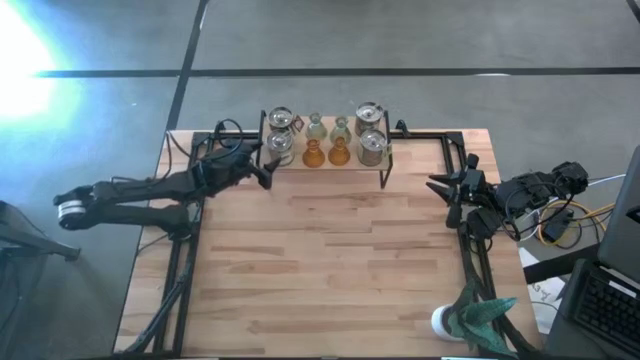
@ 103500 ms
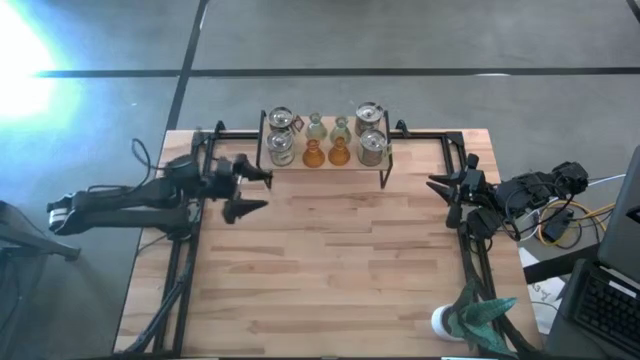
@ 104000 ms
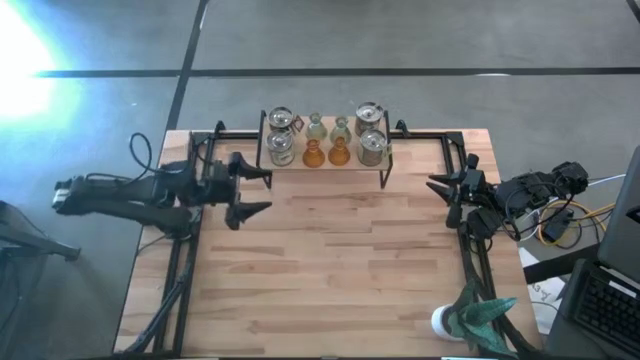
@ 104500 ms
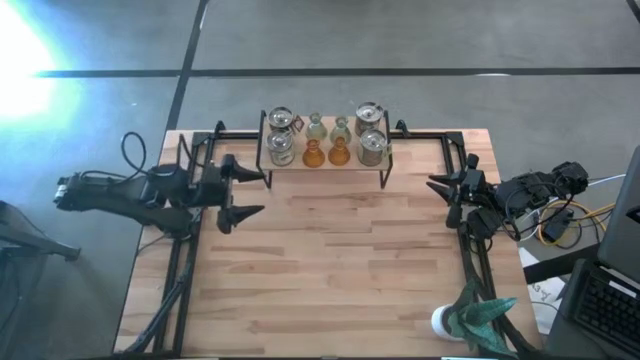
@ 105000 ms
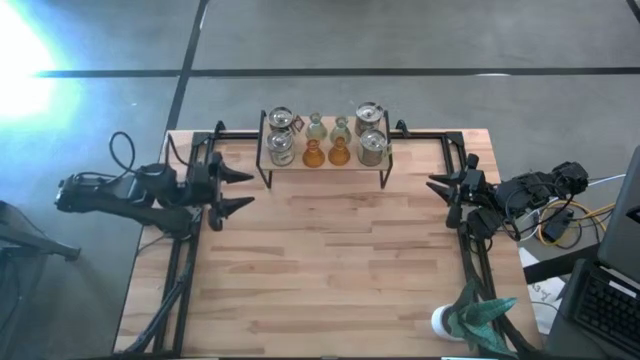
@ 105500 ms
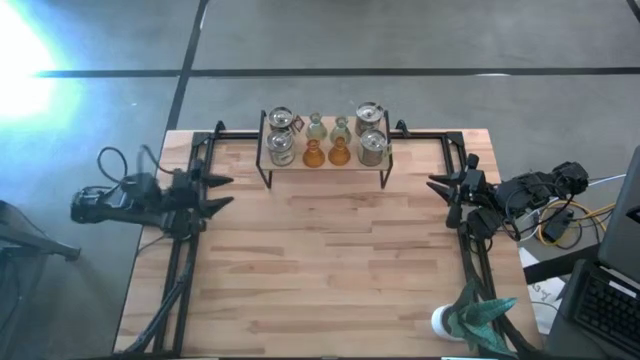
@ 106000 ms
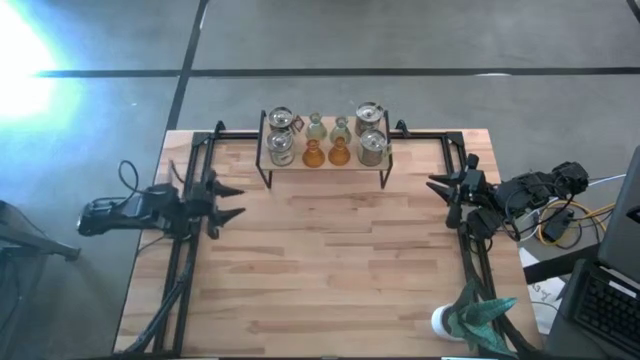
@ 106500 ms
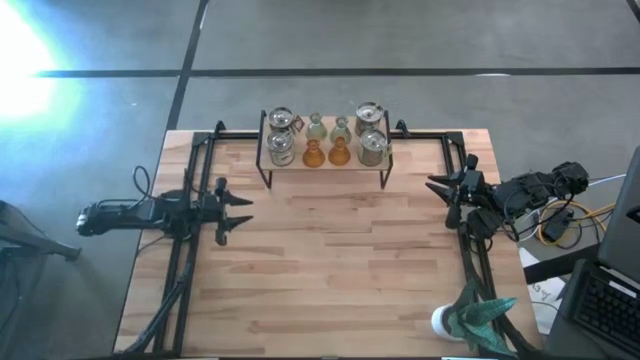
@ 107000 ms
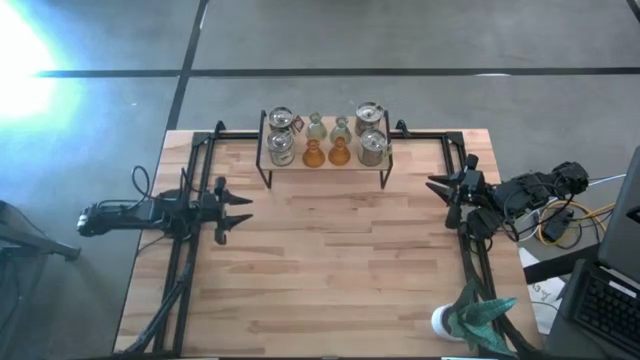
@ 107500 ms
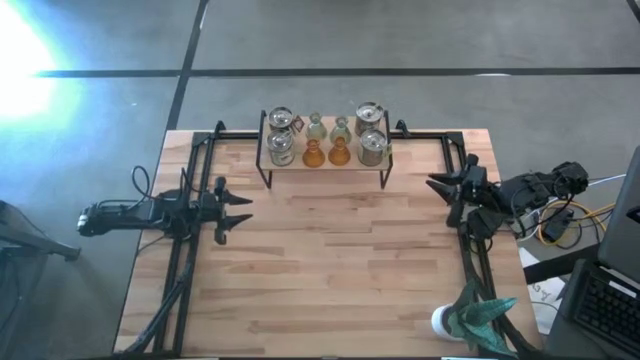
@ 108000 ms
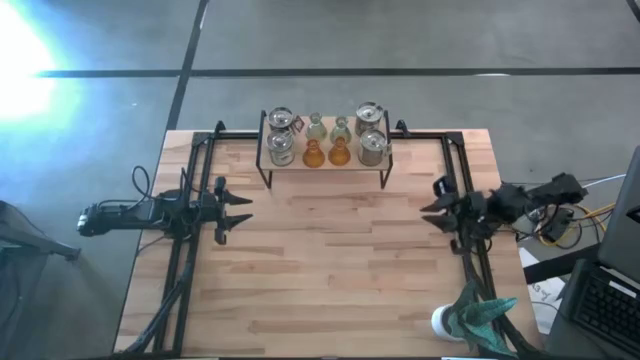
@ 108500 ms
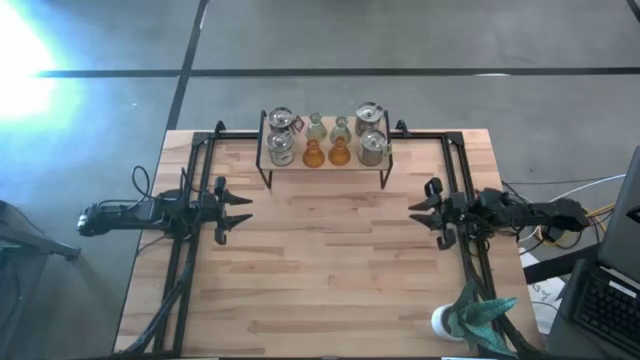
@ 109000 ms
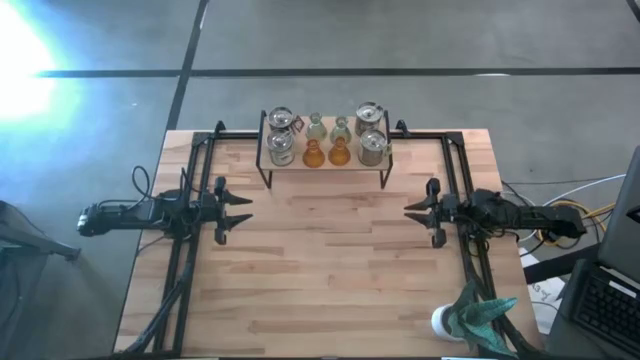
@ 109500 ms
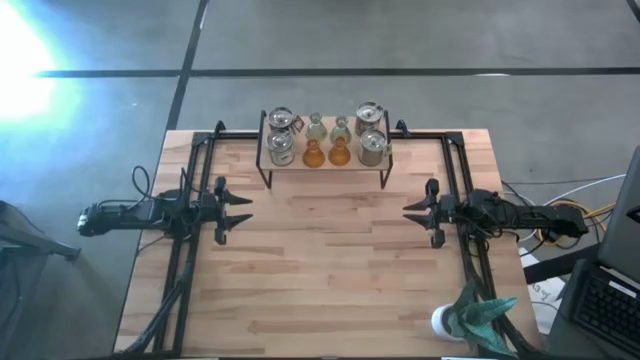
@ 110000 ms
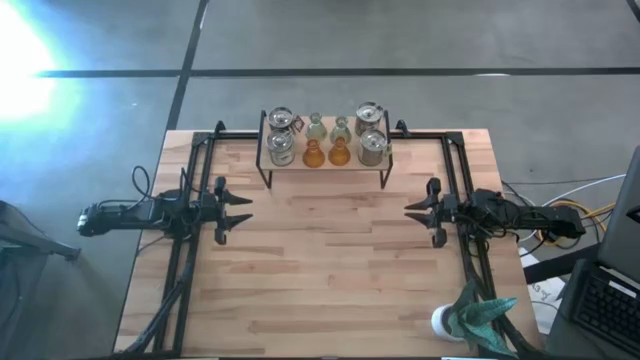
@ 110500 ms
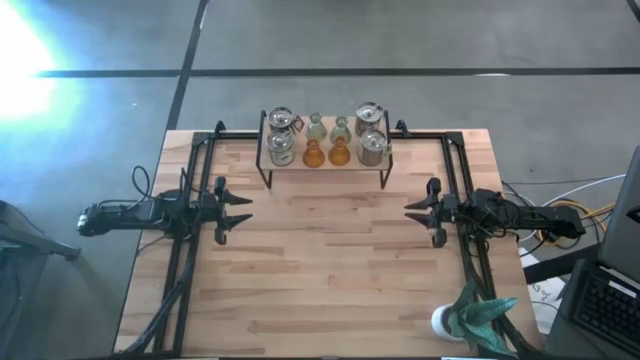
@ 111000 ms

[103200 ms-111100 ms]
Task: Pick & Place candle stick holders
Return to Home Position
